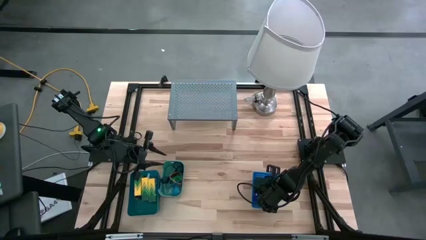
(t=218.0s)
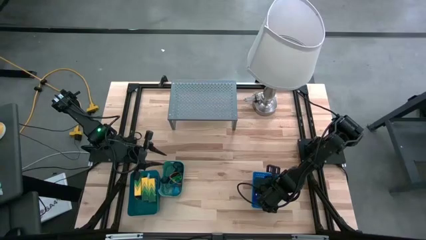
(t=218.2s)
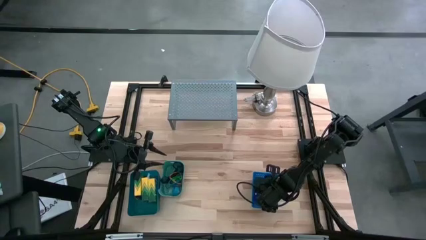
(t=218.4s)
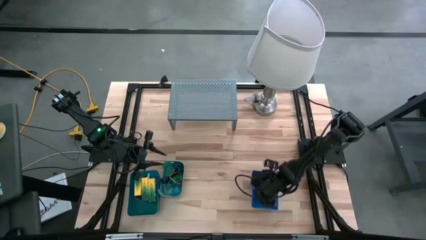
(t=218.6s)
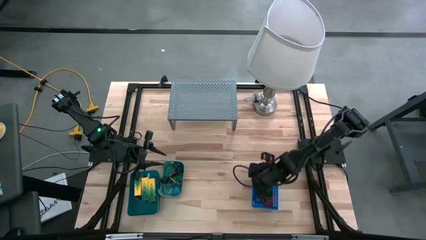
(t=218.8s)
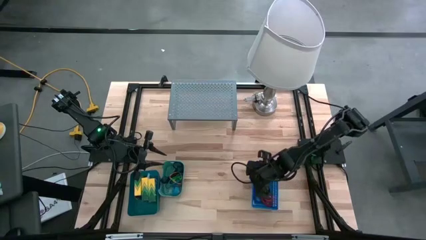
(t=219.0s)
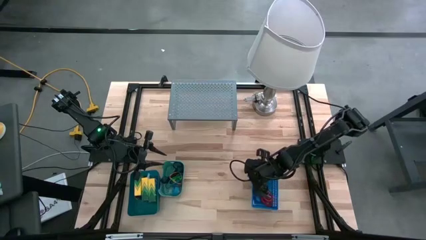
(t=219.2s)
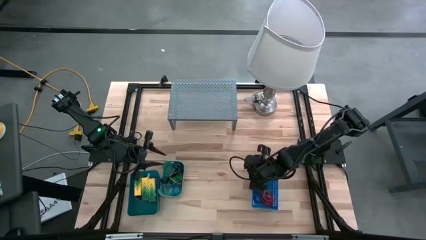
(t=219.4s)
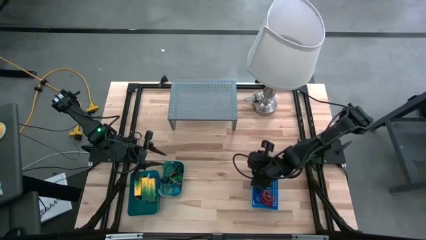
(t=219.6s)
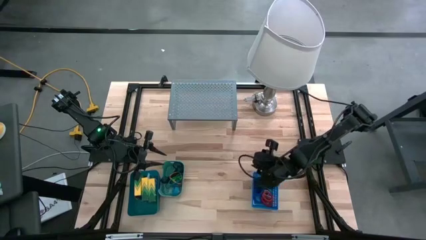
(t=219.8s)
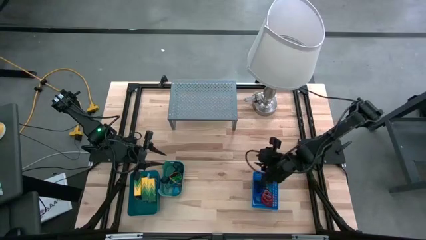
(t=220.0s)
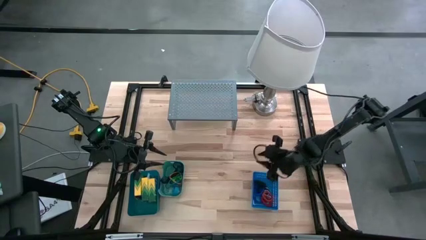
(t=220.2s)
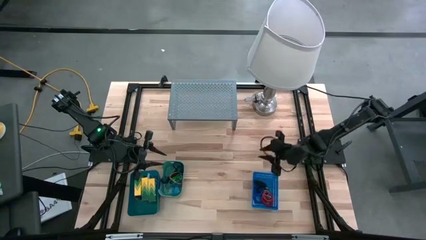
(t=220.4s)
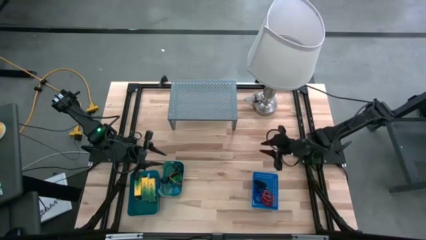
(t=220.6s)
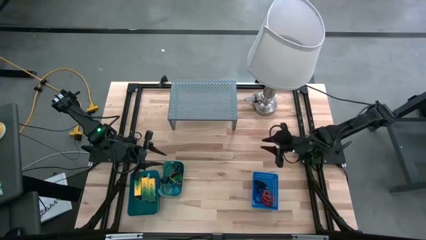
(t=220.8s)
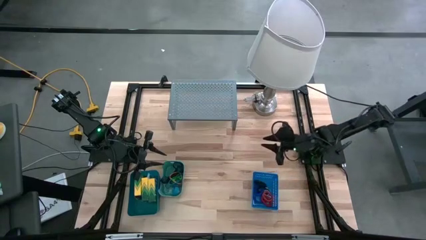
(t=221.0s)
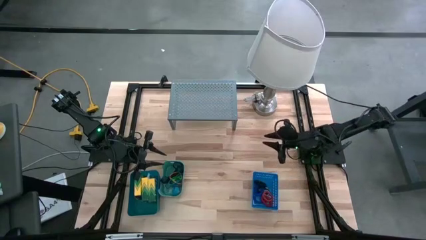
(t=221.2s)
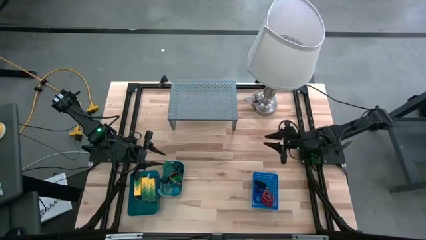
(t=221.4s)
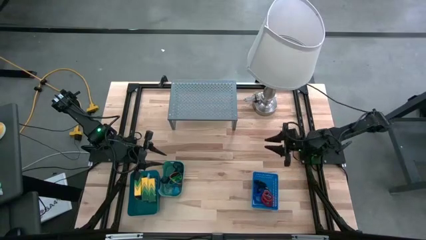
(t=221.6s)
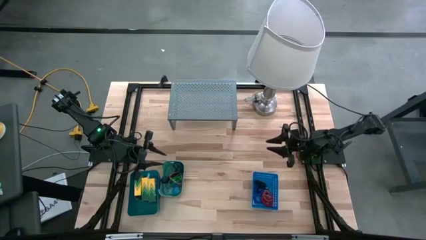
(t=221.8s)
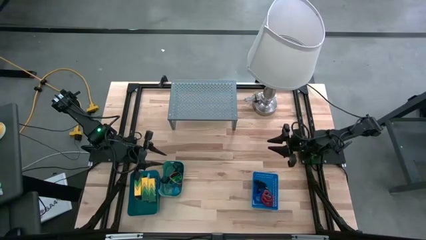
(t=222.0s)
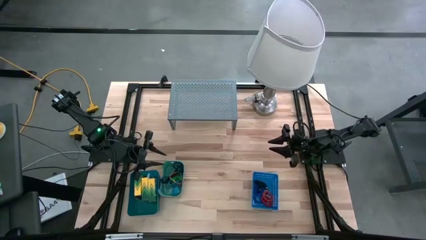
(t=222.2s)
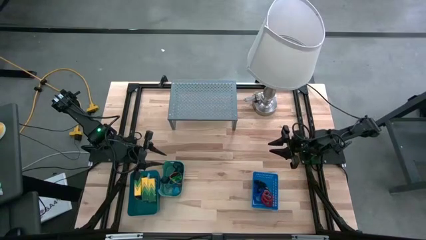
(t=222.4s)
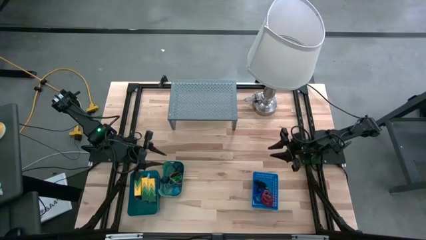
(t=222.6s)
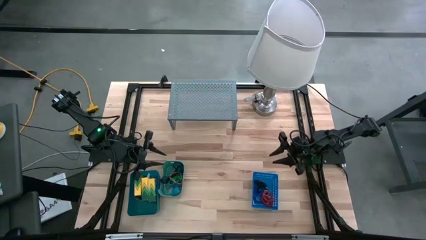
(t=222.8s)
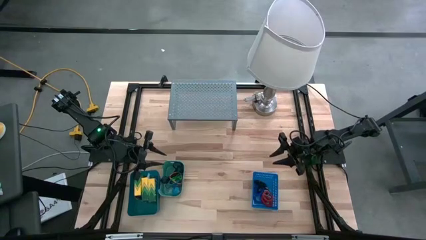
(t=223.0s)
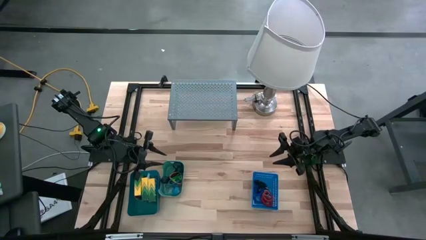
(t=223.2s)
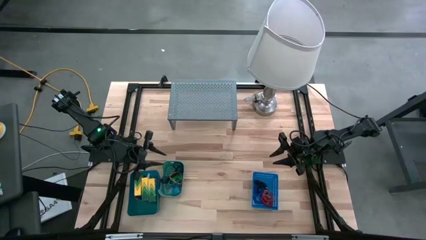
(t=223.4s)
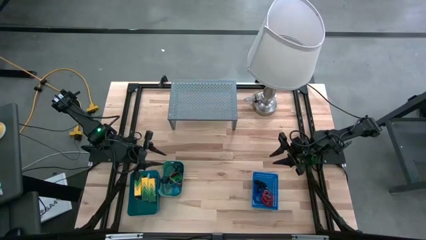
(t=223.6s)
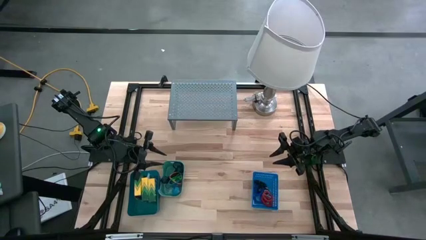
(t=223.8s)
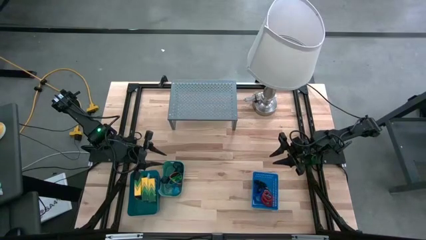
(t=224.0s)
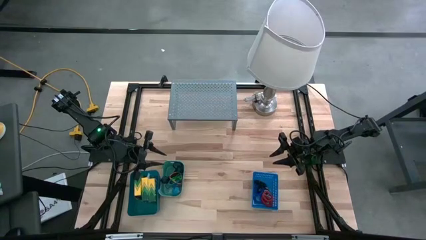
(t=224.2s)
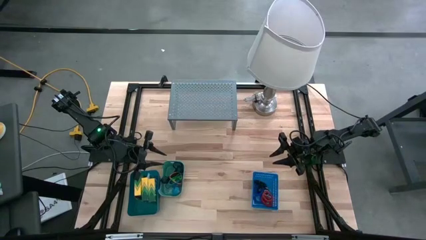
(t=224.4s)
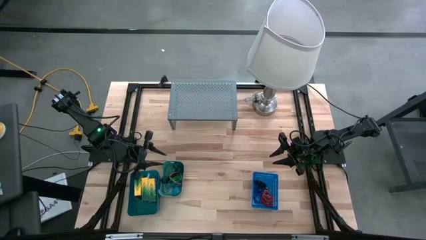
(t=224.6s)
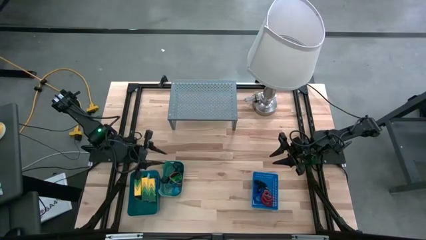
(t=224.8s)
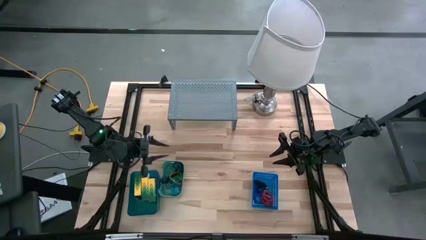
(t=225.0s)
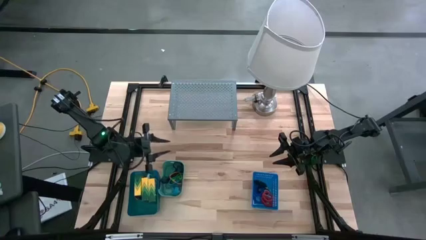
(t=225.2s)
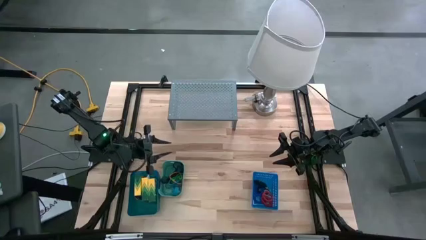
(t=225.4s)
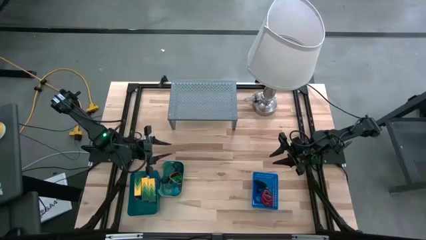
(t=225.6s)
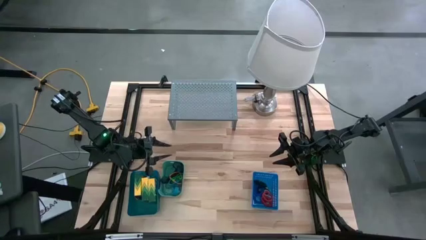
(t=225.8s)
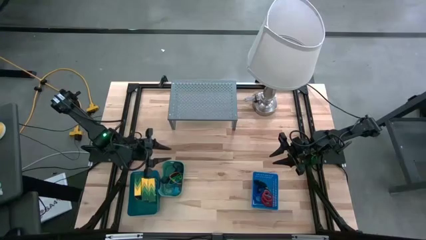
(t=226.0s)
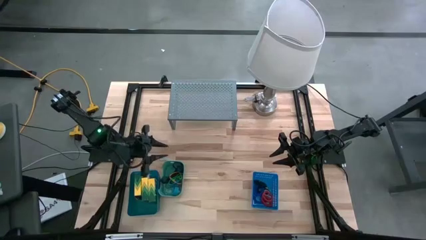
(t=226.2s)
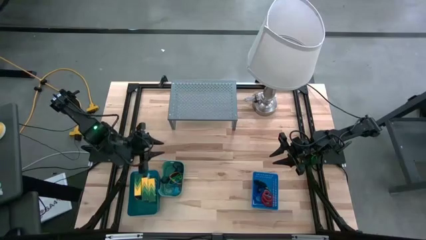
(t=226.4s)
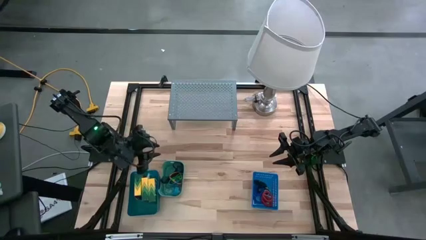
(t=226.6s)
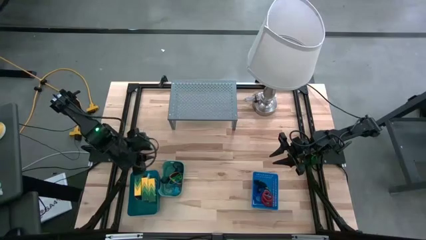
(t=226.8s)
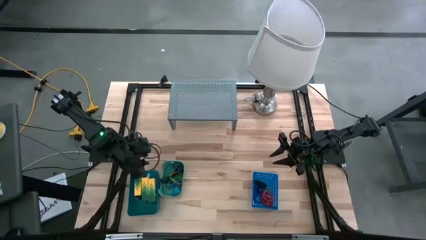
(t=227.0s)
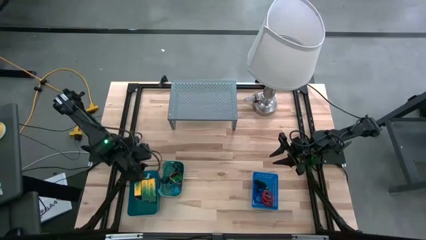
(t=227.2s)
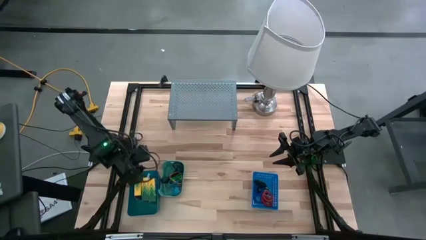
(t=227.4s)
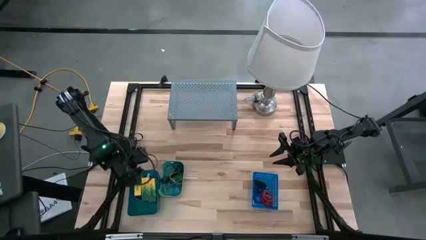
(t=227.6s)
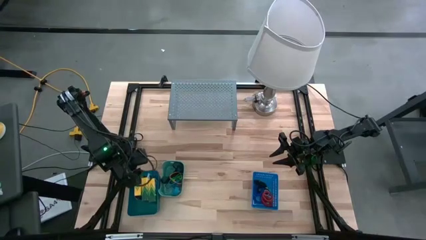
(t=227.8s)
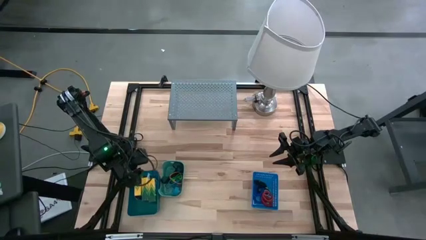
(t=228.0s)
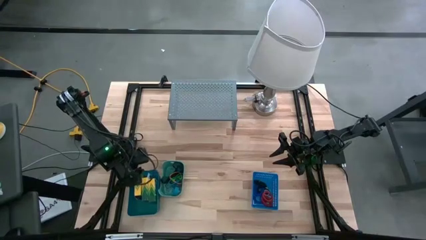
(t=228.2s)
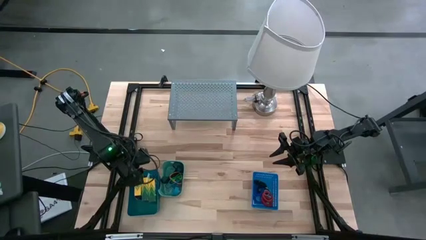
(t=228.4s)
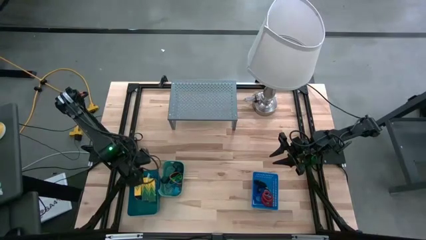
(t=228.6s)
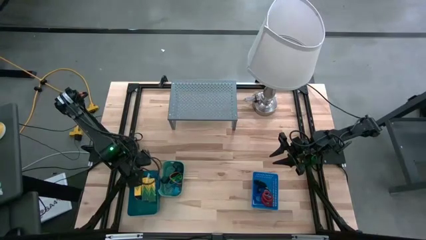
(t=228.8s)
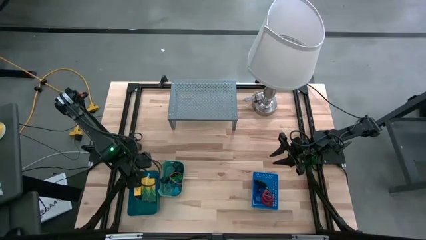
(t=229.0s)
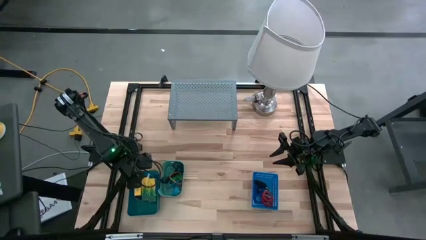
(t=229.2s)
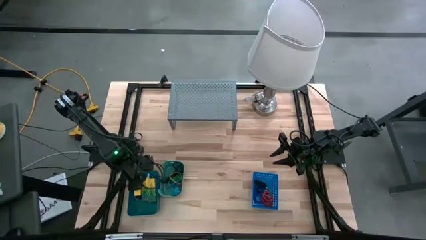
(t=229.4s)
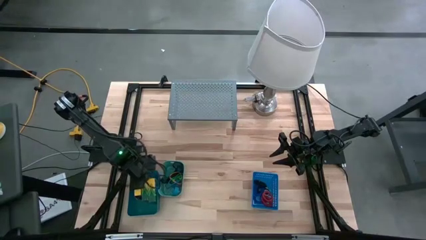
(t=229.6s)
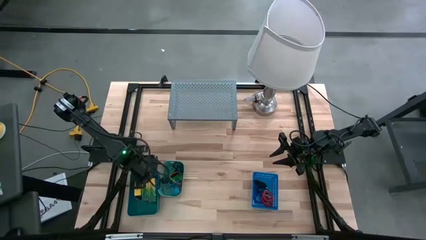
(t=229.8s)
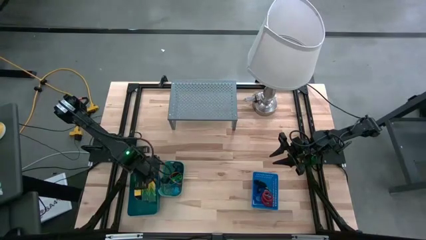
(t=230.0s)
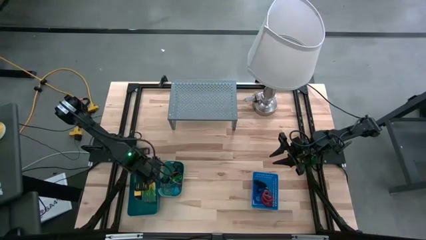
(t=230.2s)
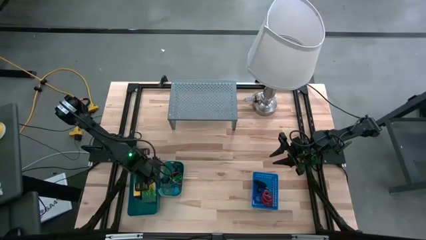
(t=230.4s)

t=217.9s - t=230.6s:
Task: Pick & Place Office Desk Supplies
Put the light blue bin with box of crayons on the shelf

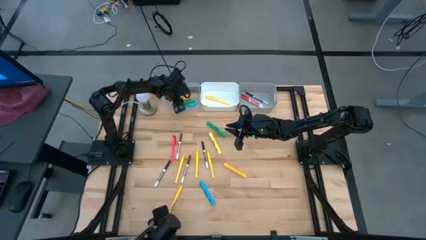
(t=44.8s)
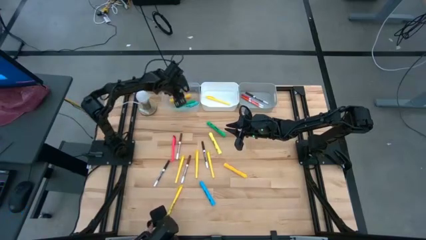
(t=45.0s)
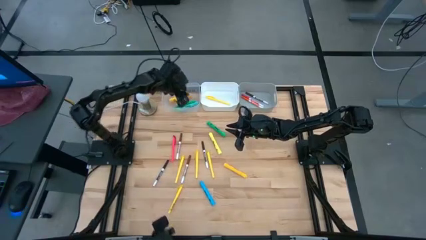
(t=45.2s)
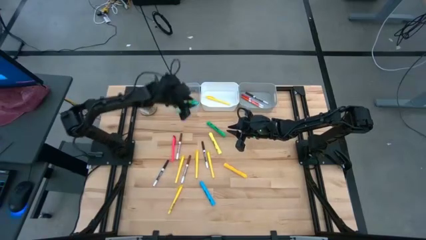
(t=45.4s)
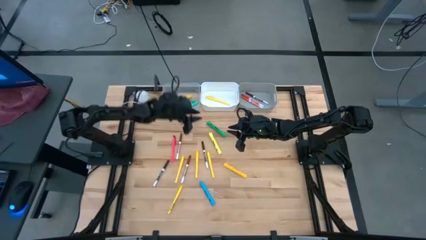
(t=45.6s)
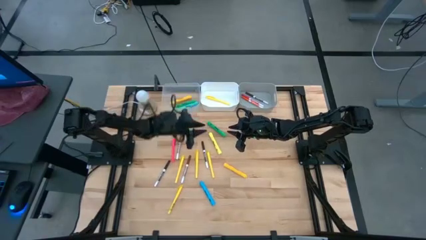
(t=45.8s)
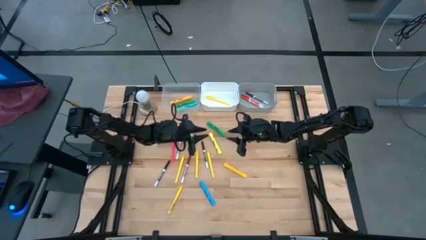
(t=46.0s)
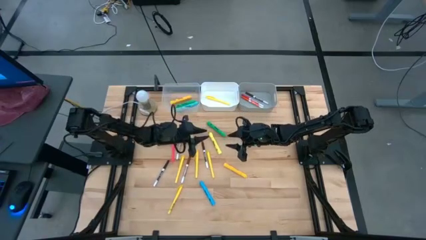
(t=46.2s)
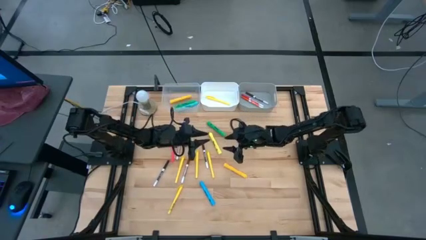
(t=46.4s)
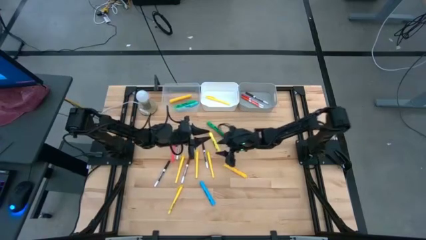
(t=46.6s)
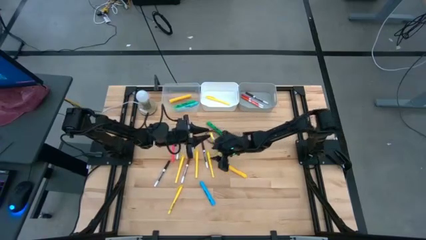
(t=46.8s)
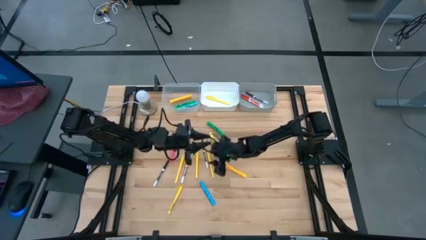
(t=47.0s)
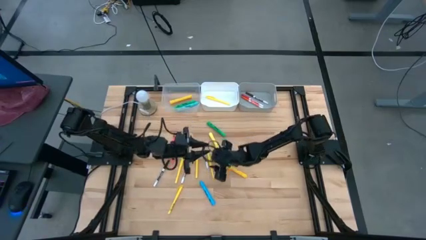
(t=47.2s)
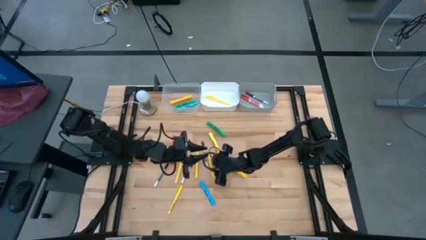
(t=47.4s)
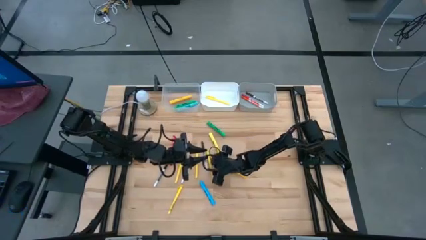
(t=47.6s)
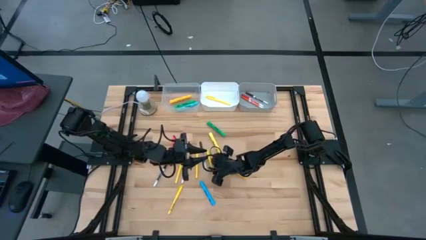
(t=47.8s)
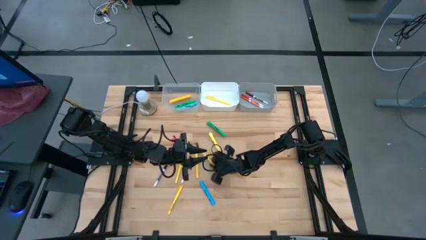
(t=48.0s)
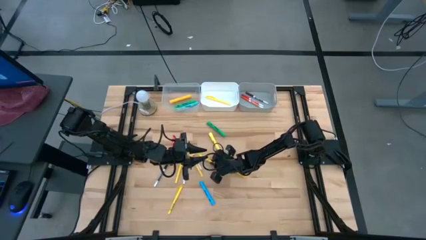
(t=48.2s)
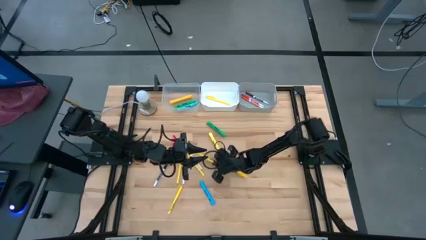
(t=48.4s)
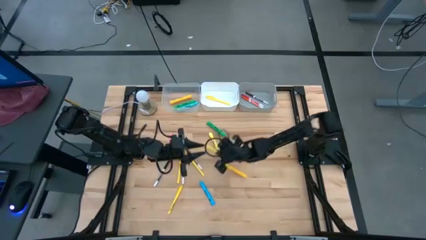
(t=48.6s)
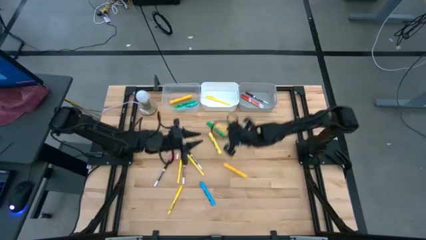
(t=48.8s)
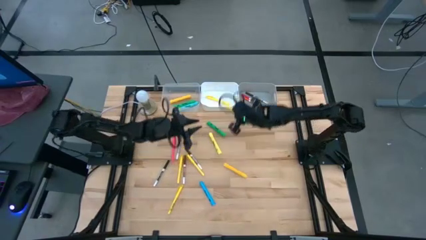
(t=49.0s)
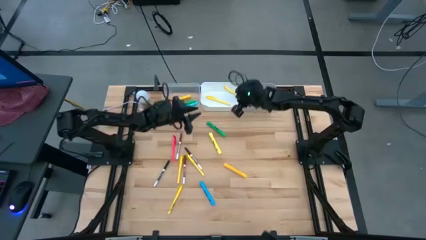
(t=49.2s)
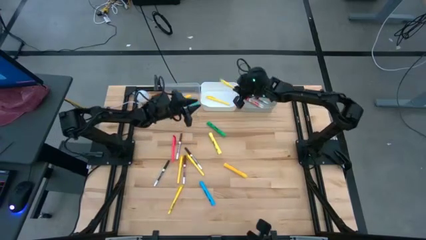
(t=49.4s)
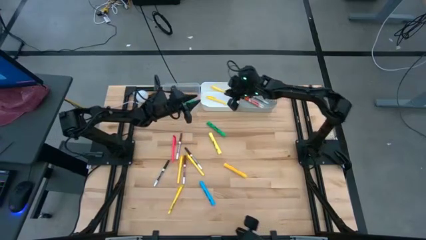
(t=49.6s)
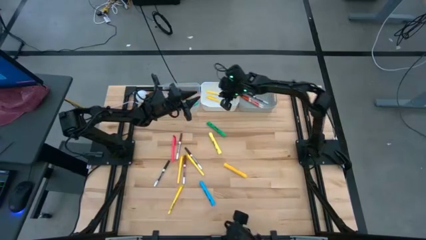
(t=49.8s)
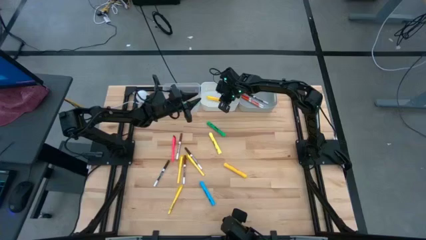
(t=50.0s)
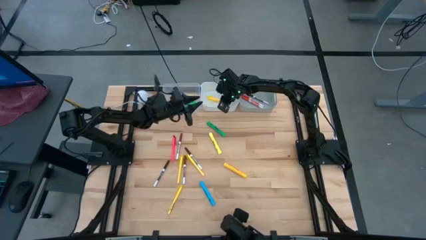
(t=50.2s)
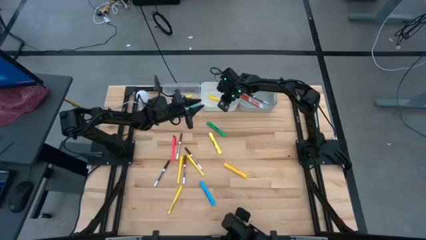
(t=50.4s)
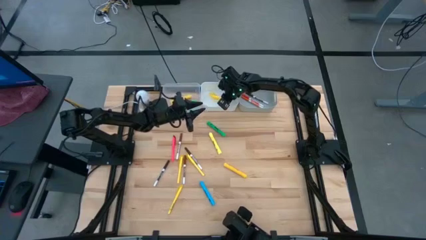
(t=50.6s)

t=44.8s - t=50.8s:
Task: Pick & Place Markers
Put the yellow pen into the white bin
